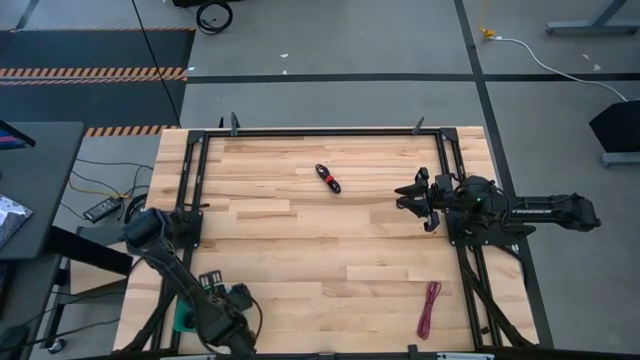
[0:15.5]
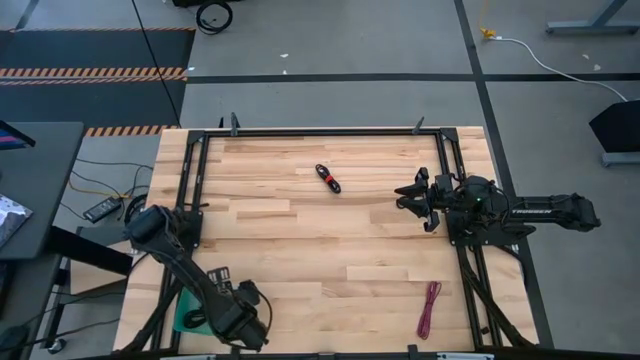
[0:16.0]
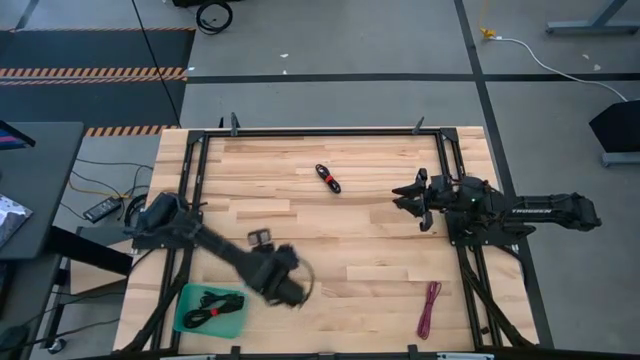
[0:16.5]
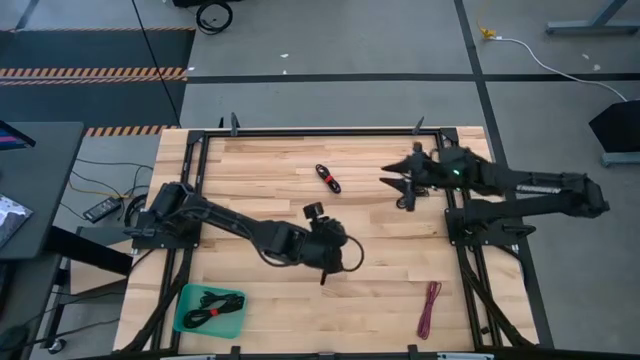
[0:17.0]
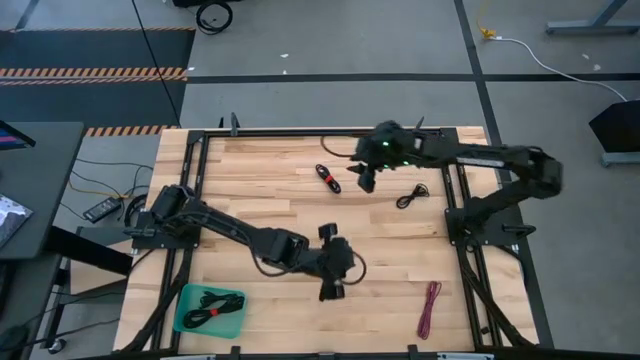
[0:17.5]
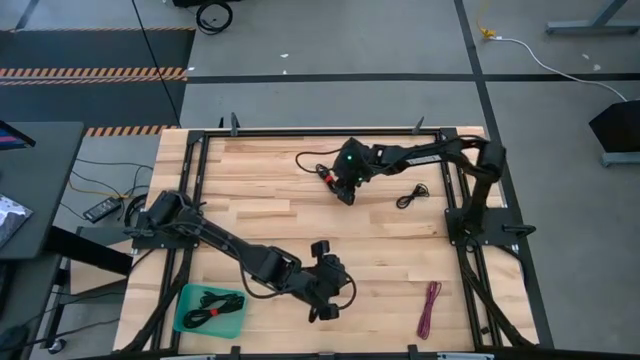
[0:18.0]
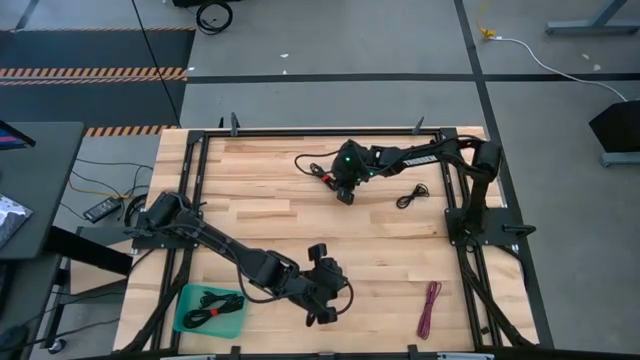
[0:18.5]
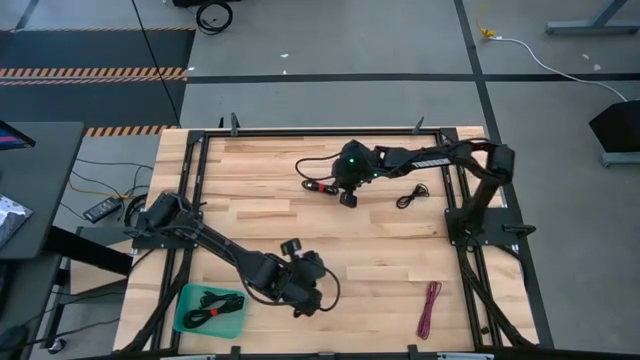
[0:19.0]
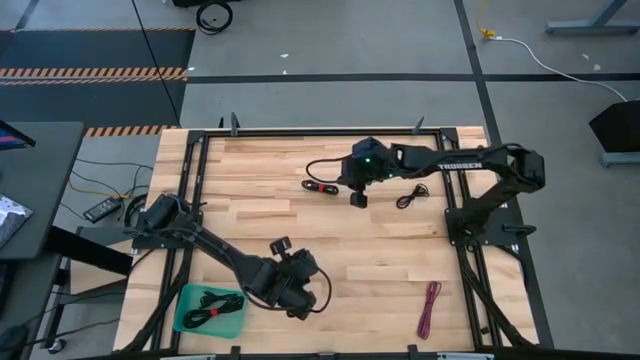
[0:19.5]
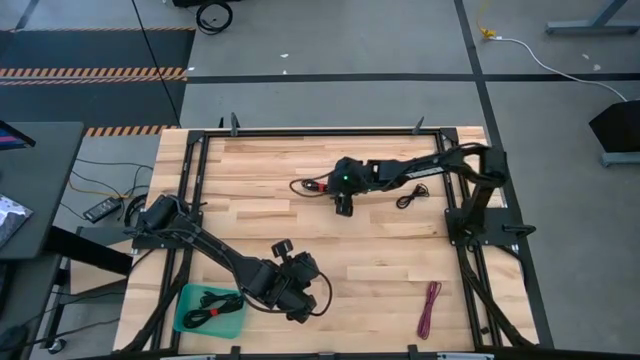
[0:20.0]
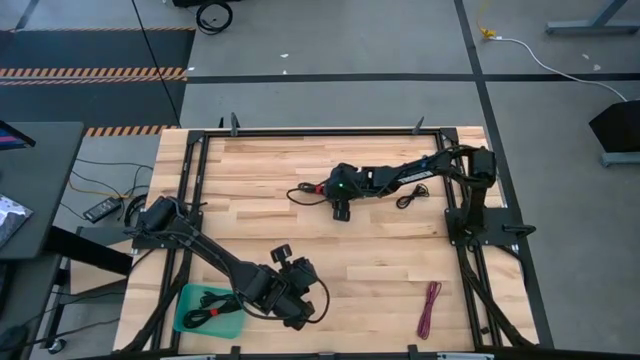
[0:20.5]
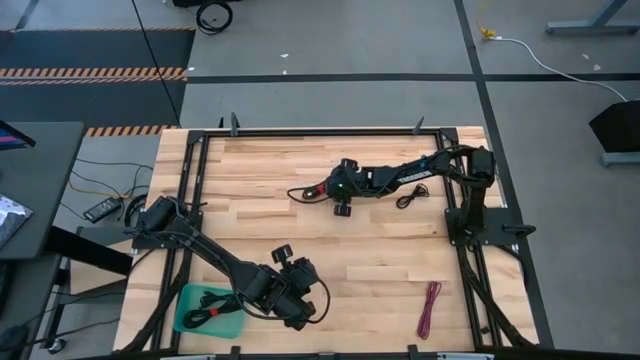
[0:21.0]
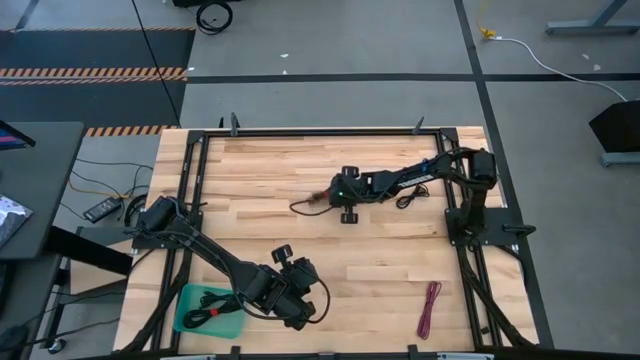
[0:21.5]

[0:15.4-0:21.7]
Task: Pick and place USB-C Cables
Put the black charger cable into the green bin

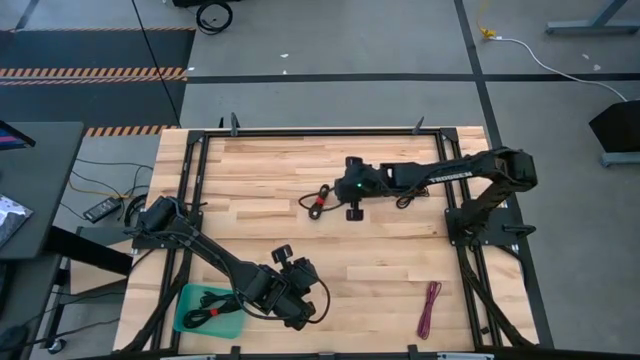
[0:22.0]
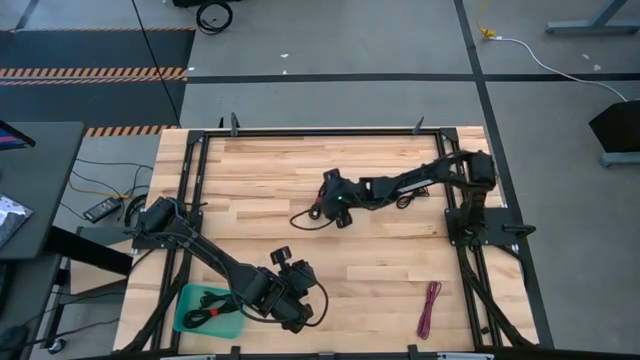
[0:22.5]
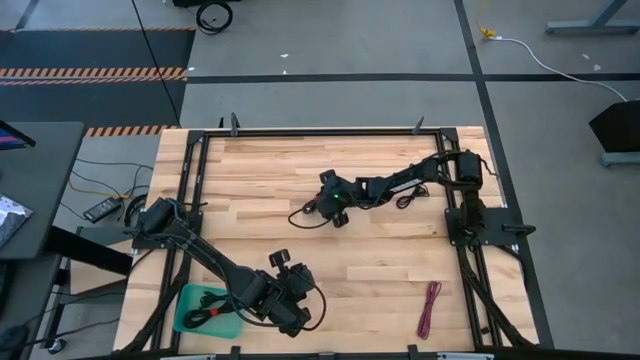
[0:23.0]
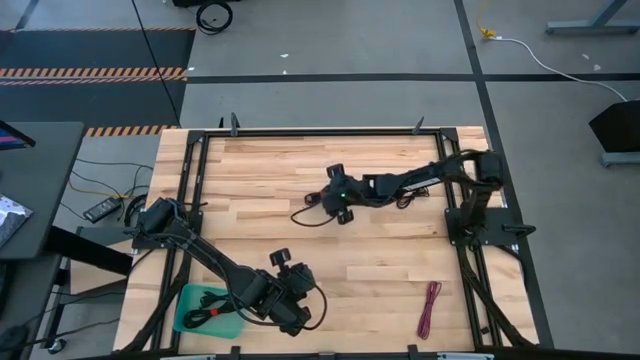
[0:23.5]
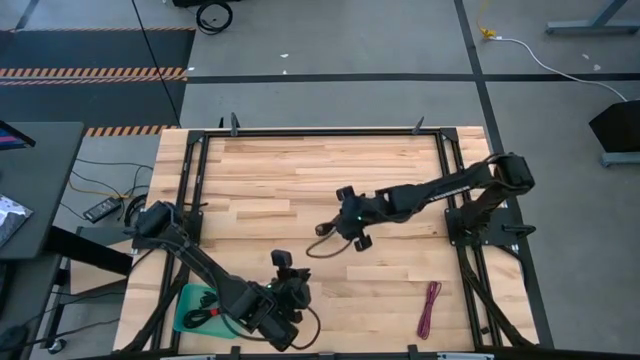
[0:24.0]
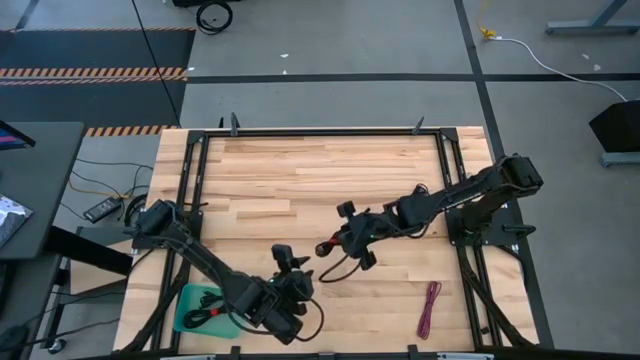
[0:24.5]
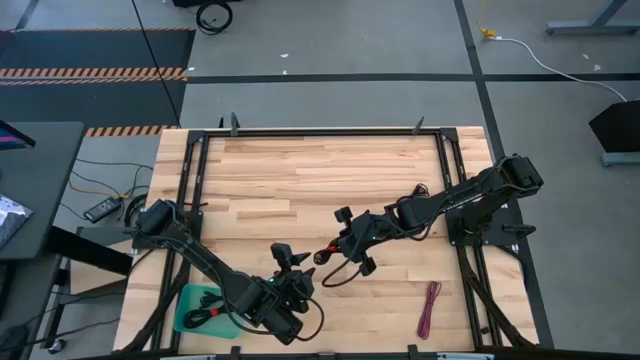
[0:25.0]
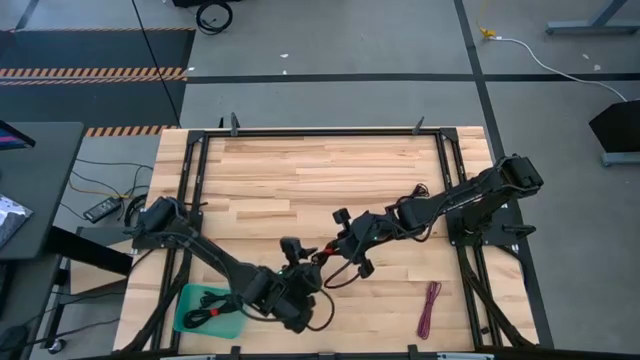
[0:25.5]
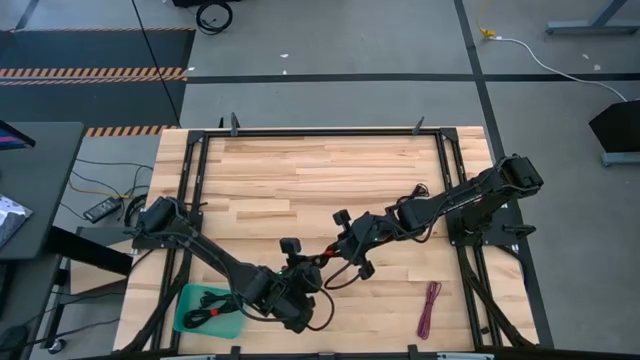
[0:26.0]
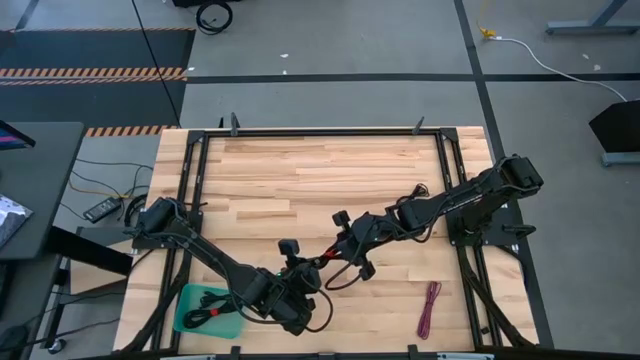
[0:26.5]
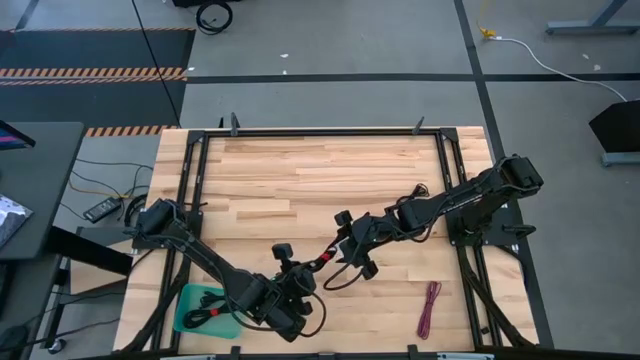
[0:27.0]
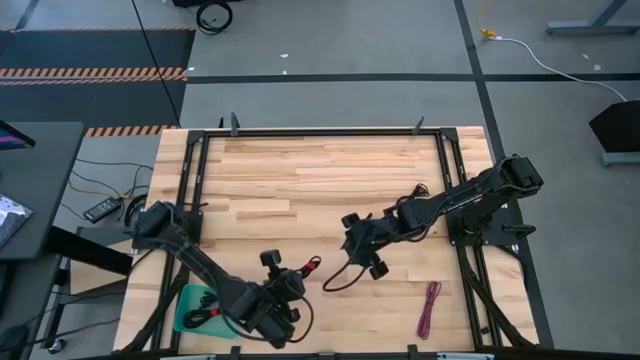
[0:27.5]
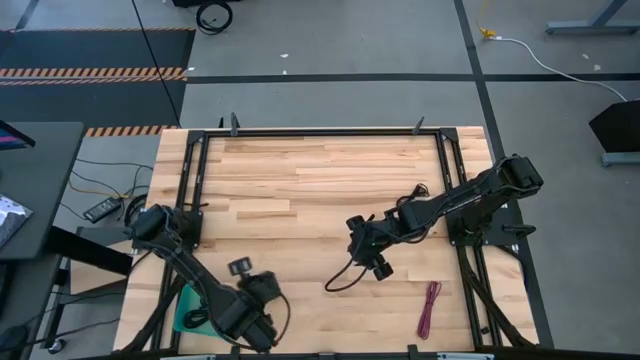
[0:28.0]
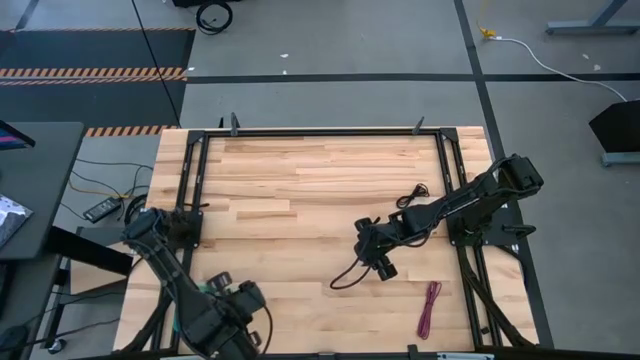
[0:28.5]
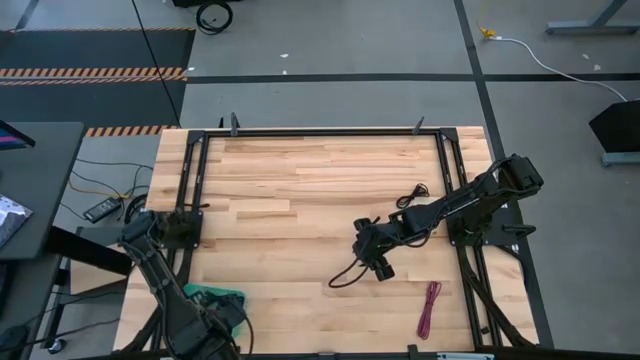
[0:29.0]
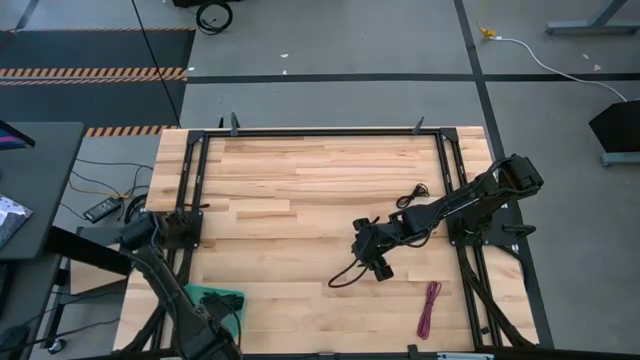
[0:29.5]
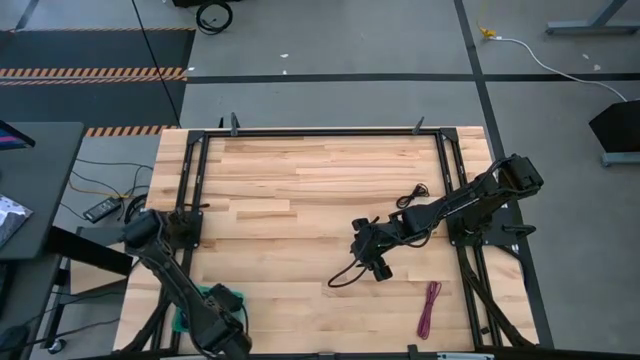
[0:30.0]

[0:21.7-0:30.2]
Put the black charger cable into the green bin

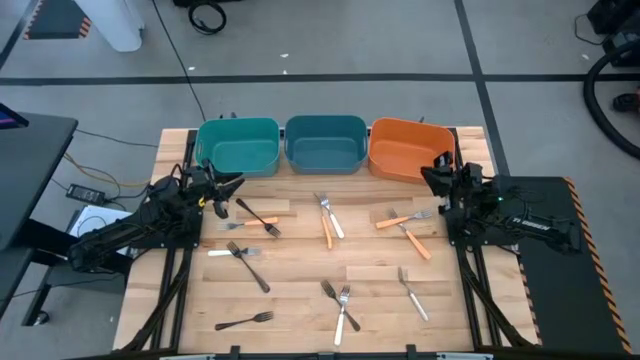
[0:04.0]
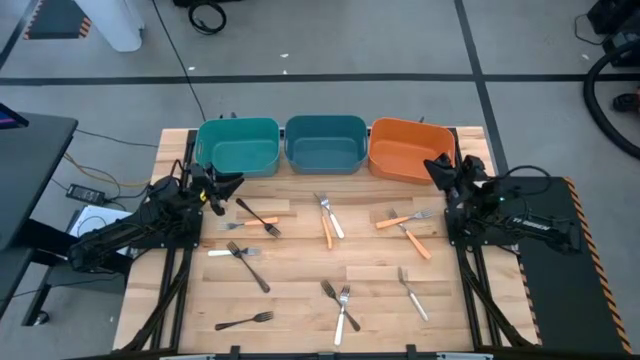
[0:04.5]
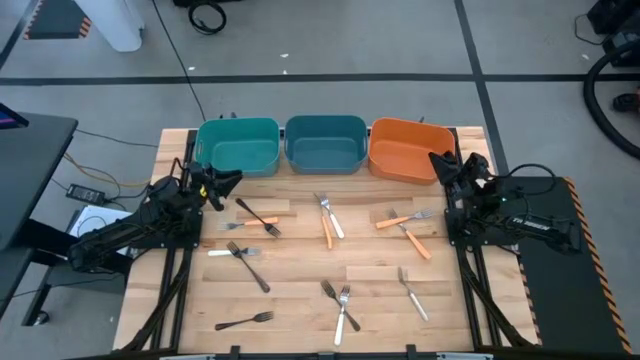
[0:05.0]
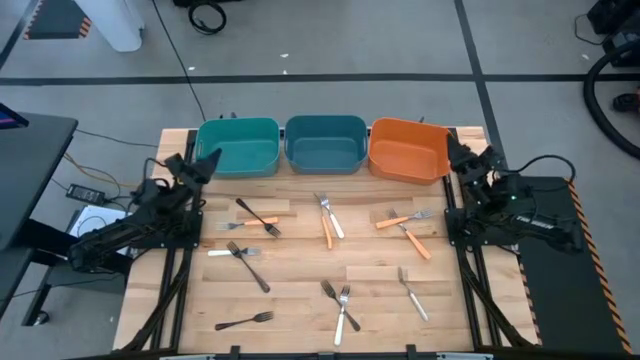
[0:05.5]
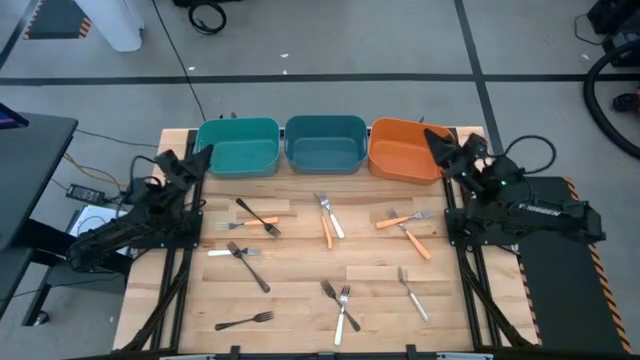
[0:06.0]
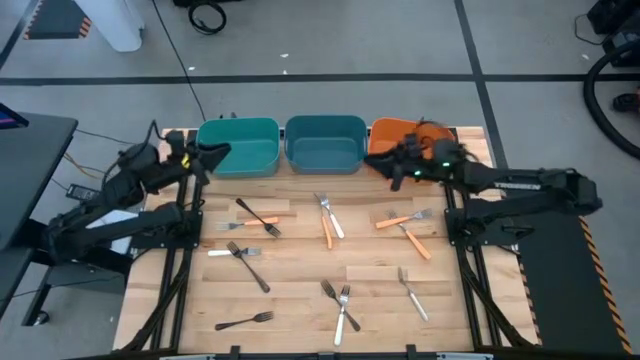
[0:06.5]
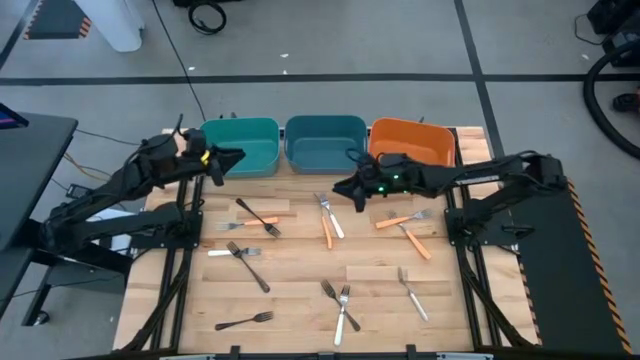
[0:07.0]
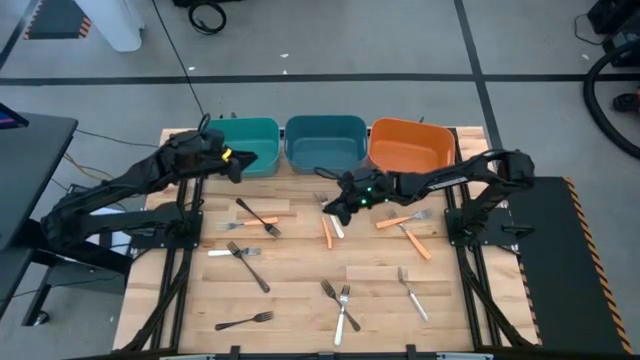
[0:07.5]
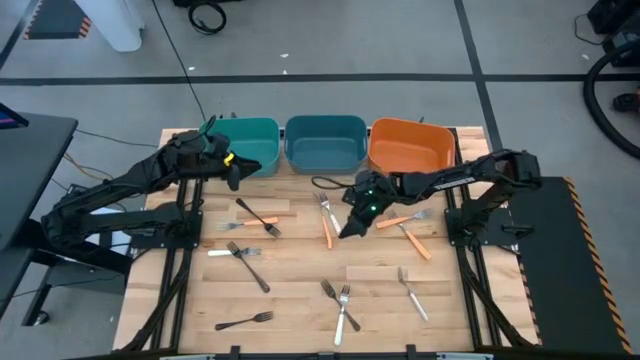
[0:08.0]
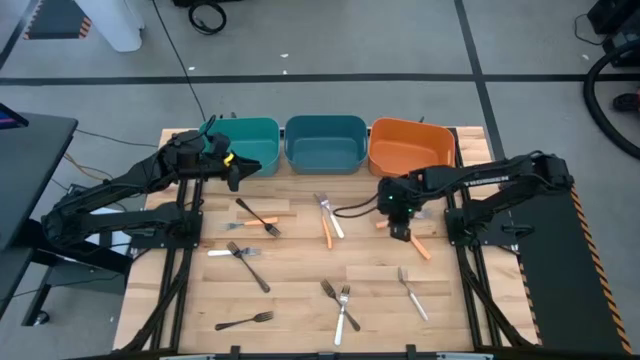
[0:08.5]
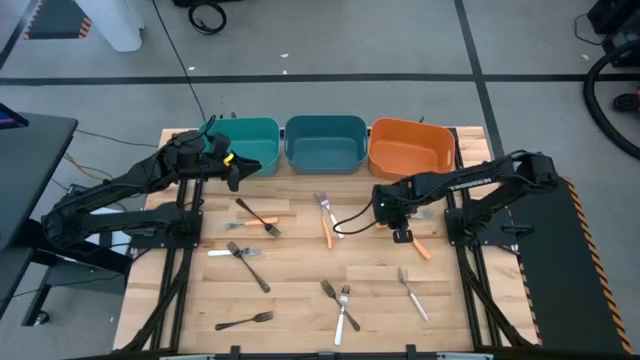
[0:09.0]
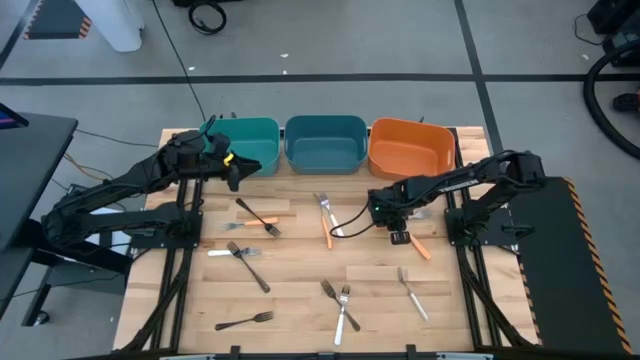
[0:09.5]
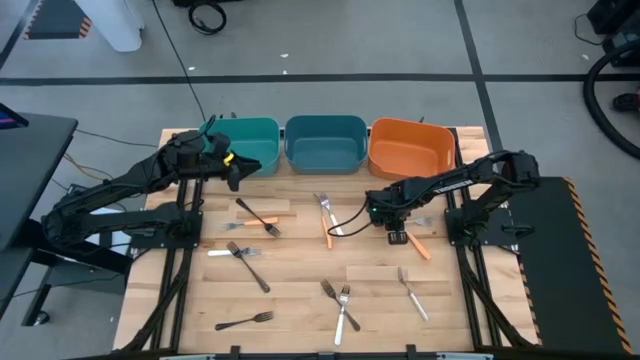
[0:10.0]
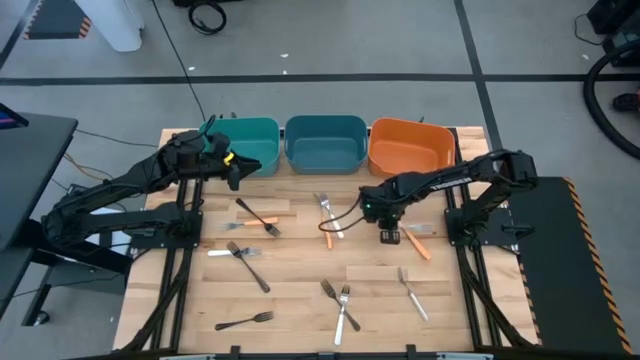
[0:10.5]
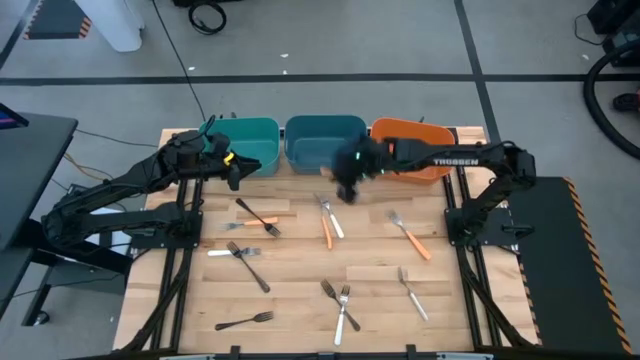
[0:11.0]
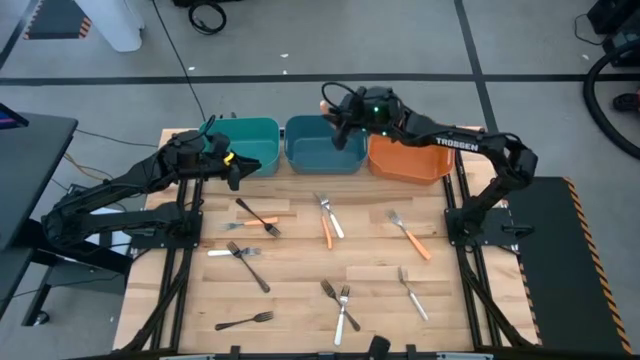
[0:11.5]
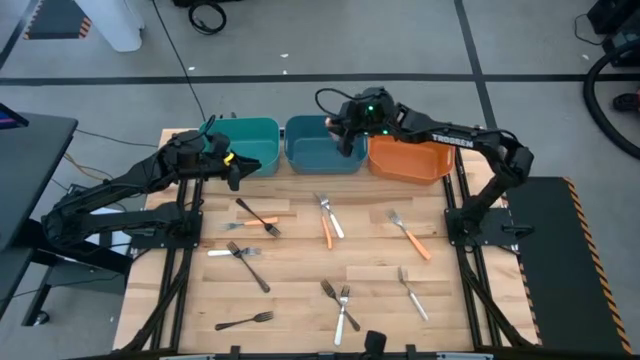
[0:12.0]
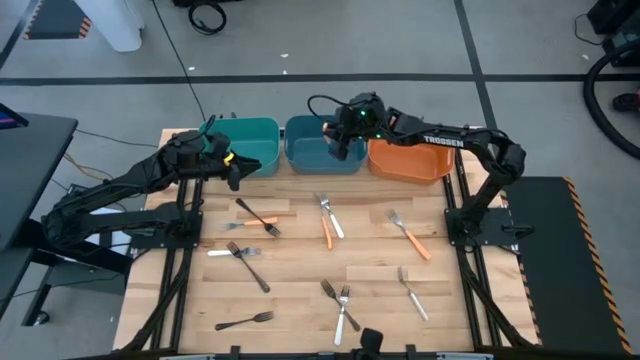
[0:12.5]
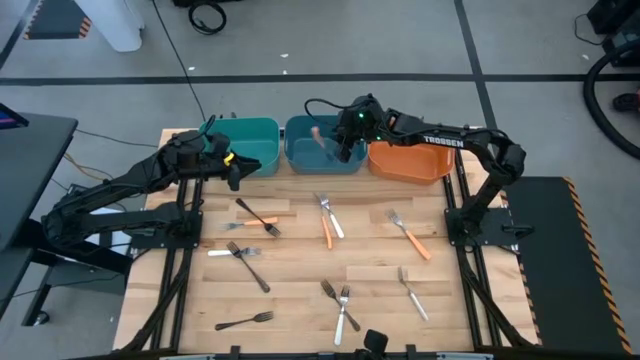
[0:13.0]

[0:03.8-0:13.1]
Task: Sort silverware by color (type)
Put the top right orange fork in the blue bin
